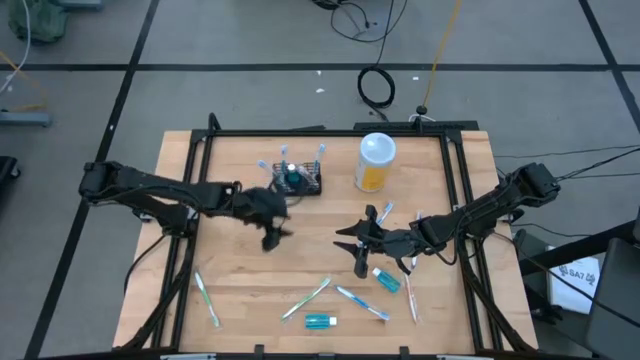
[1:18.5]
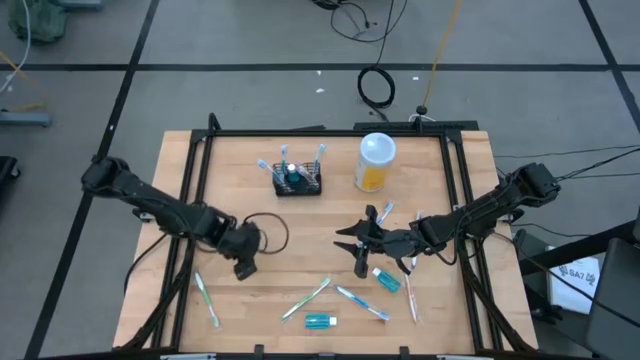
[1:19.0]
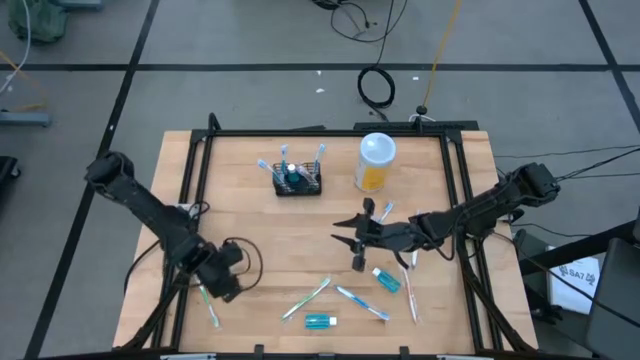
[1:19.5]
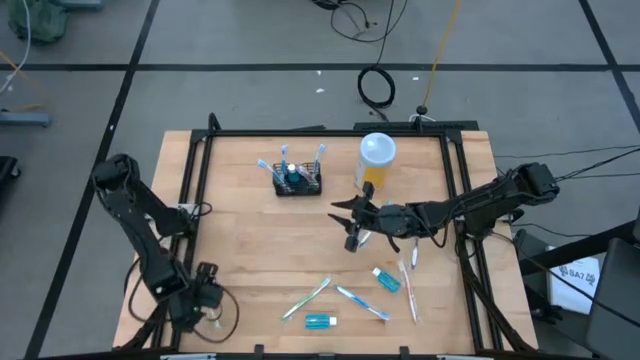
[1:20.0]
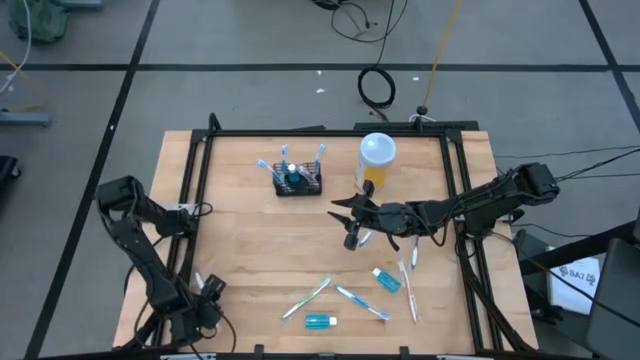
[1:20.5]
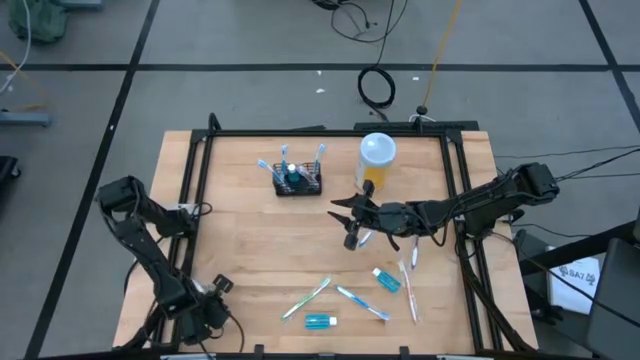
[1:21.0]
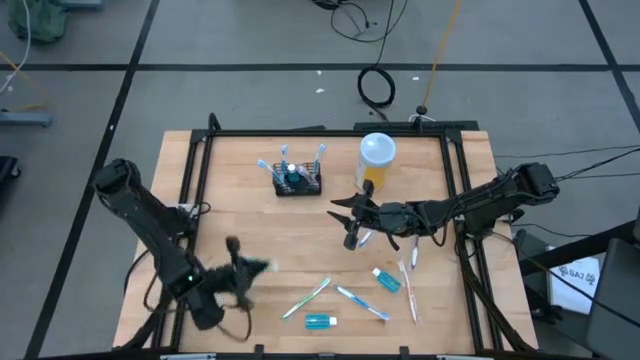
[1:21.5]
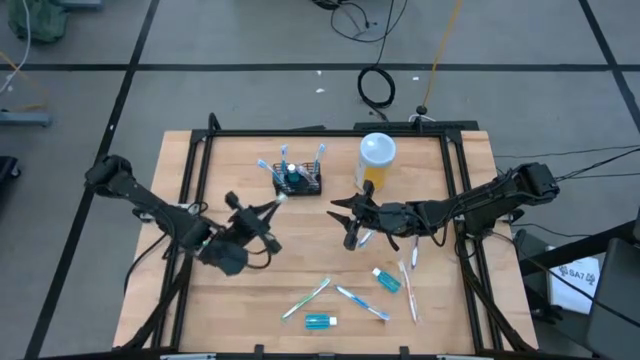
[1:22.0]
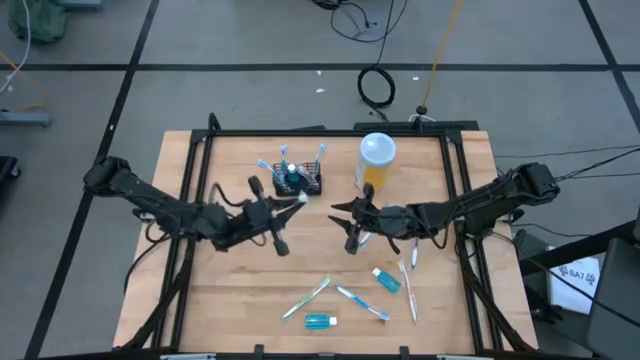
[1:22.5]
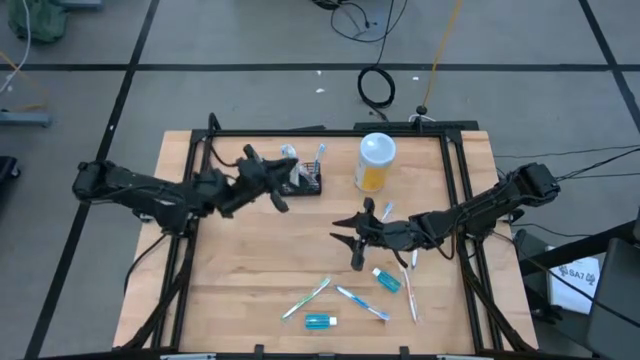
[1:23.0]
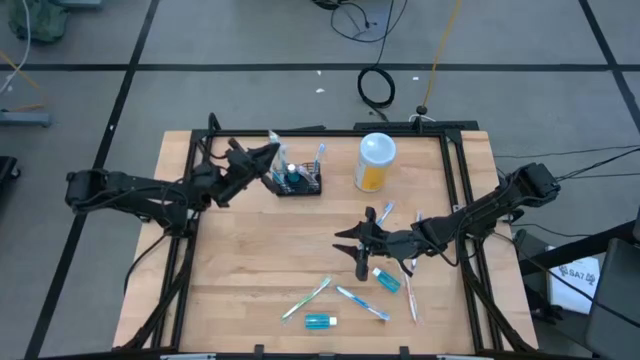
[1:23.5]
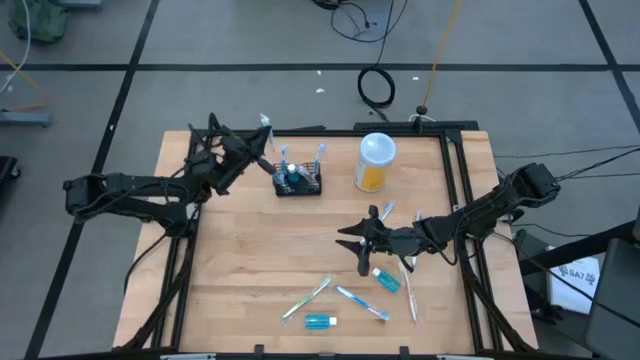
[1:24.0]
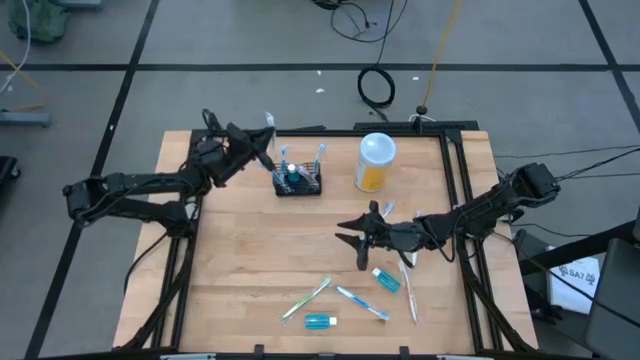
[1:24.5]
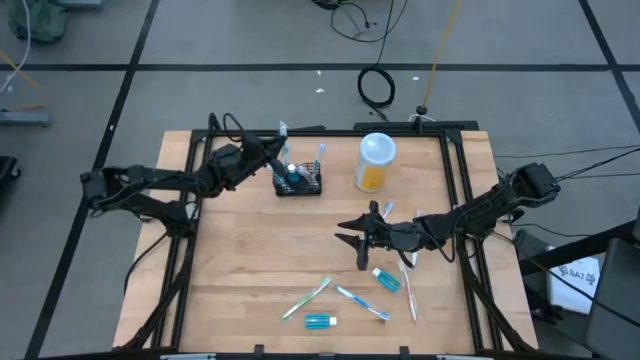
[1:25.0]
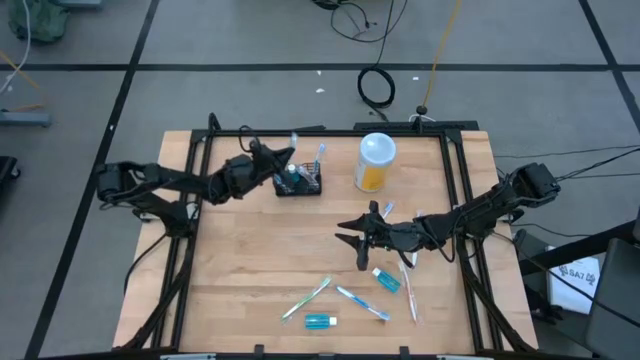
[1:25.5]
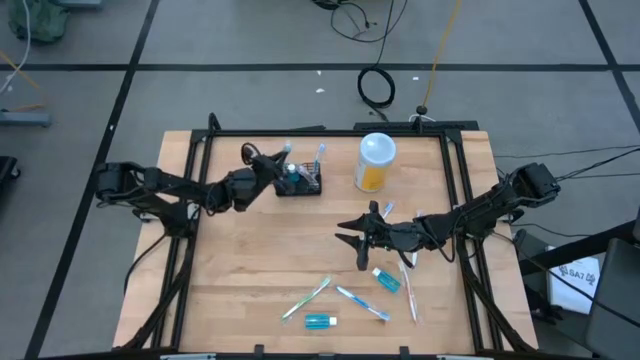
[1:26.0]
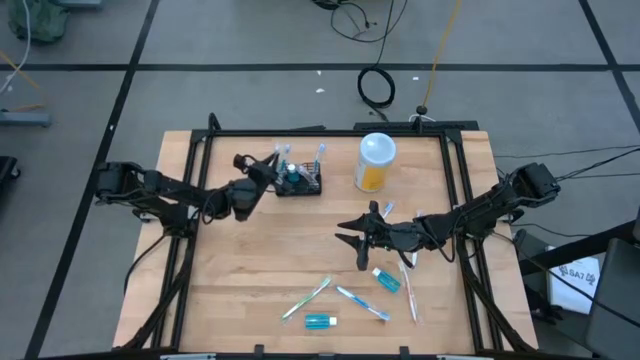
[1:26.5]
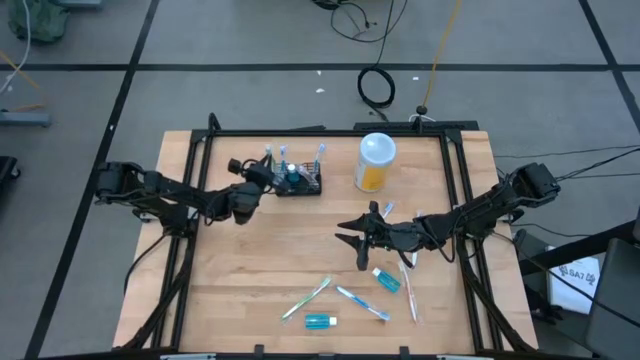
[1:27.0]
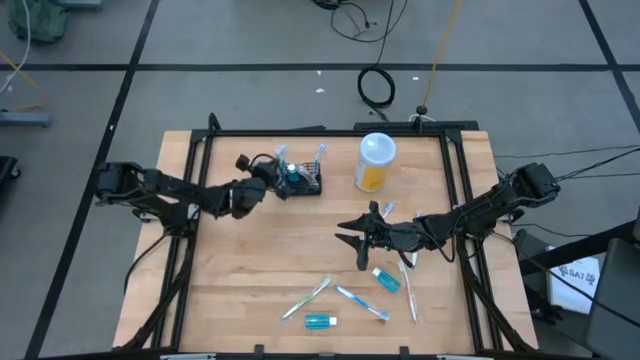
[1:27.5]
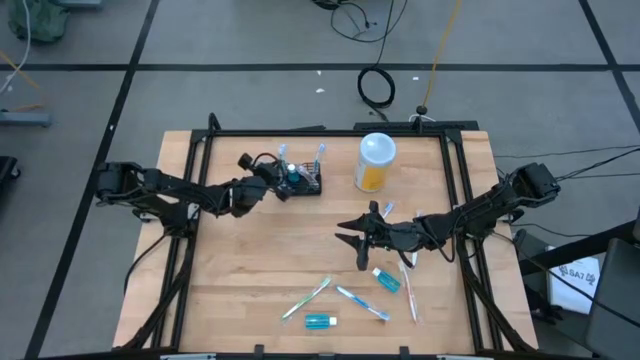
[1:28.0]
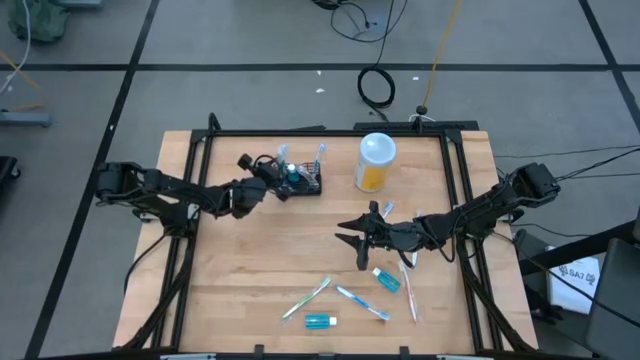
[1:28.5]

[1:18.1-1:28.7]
Task: Pick & Place toothbrushing station
Put the green toothbrush into the black mesh organizer

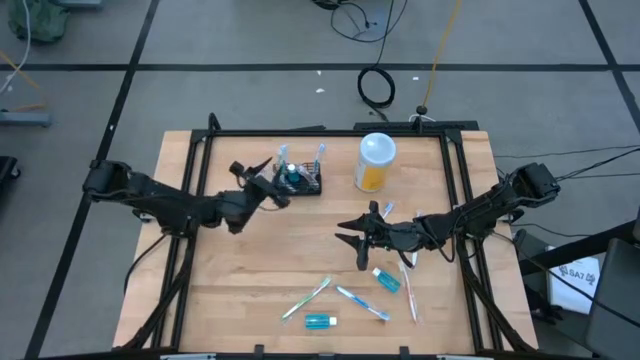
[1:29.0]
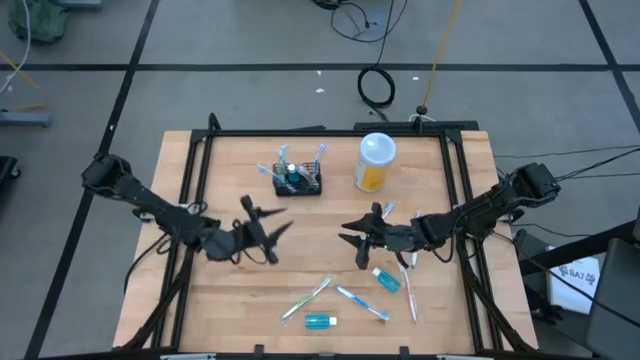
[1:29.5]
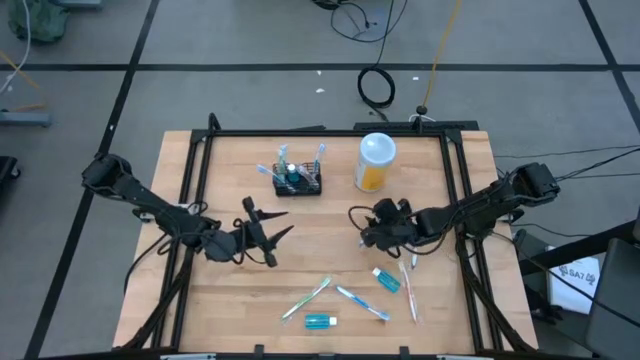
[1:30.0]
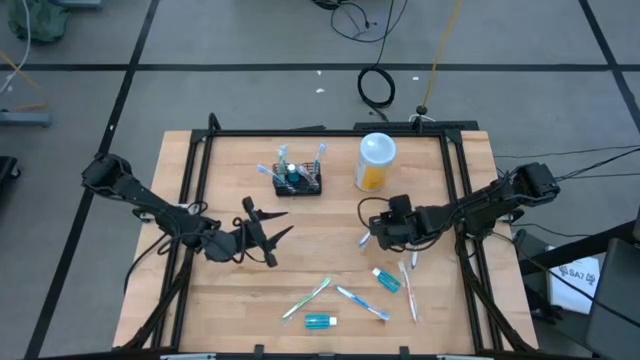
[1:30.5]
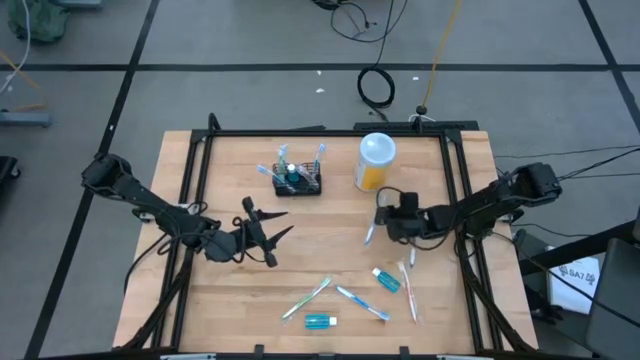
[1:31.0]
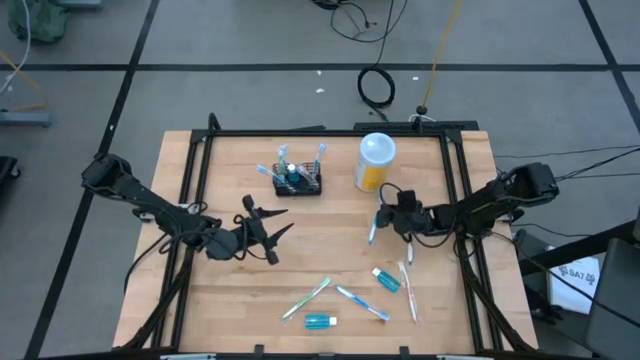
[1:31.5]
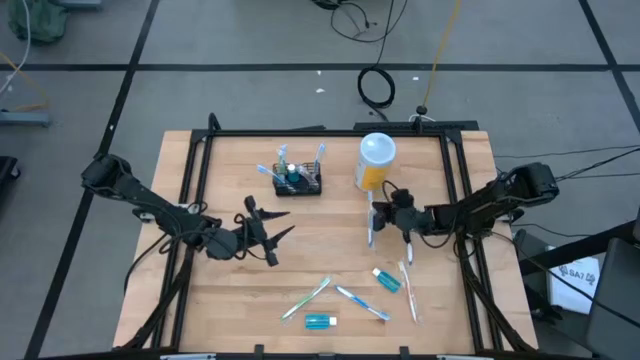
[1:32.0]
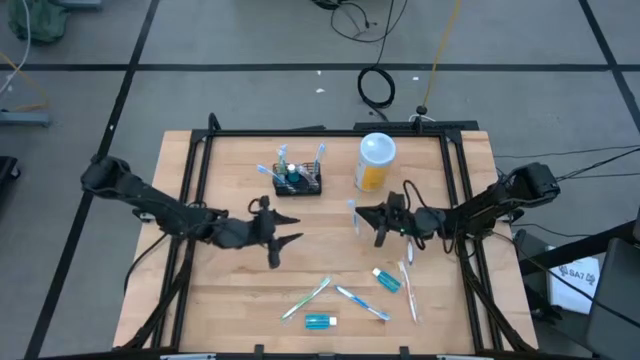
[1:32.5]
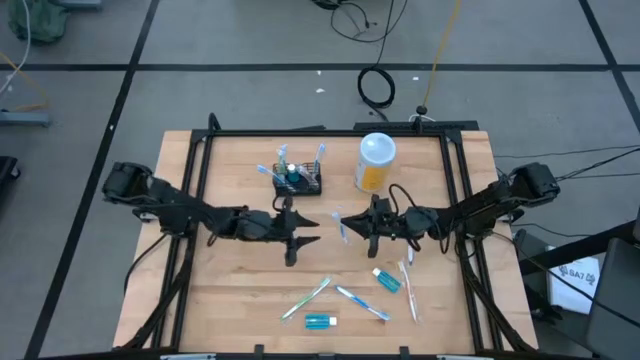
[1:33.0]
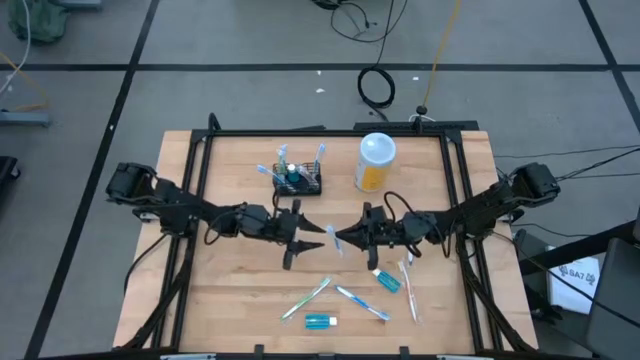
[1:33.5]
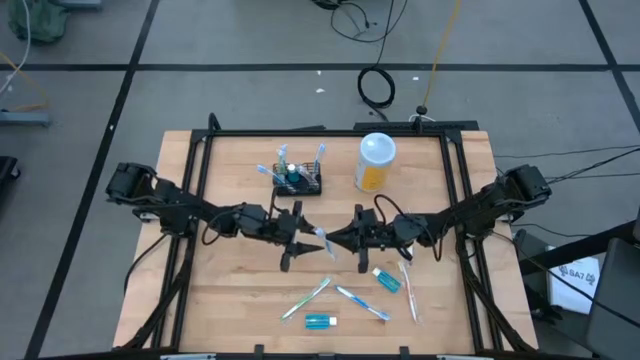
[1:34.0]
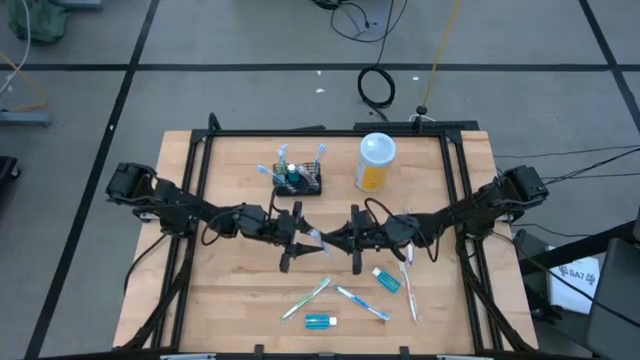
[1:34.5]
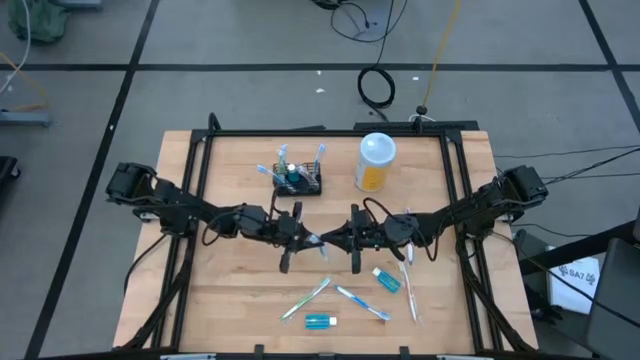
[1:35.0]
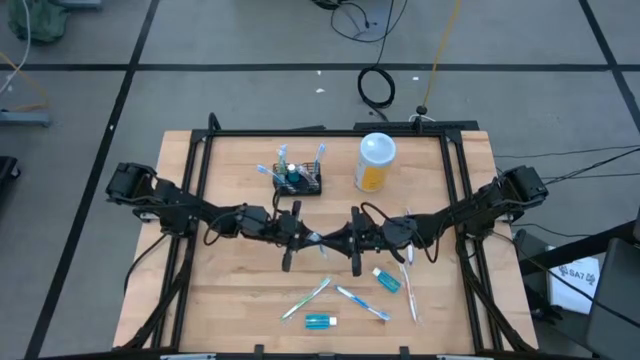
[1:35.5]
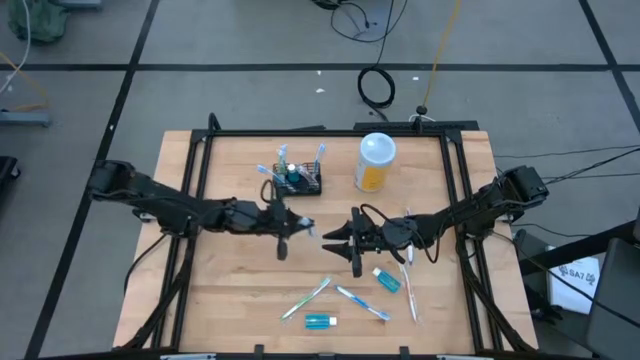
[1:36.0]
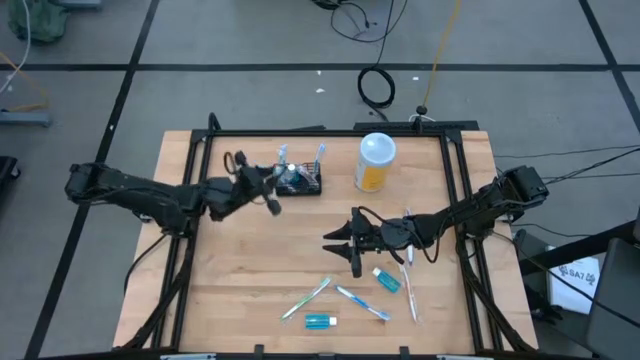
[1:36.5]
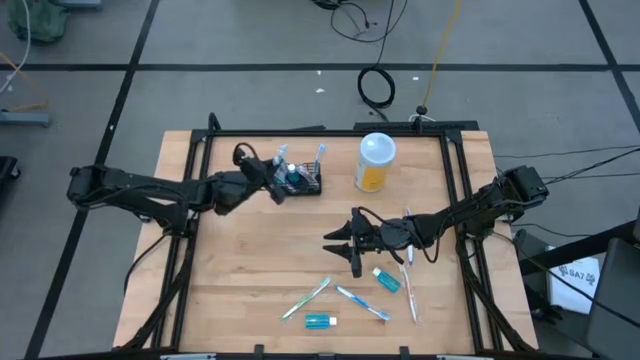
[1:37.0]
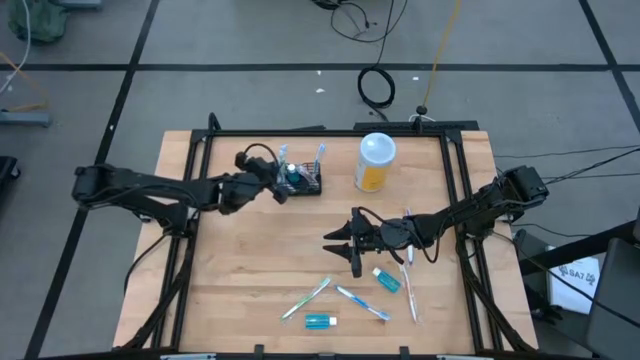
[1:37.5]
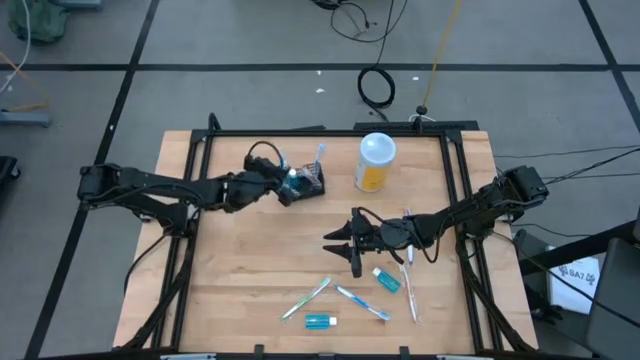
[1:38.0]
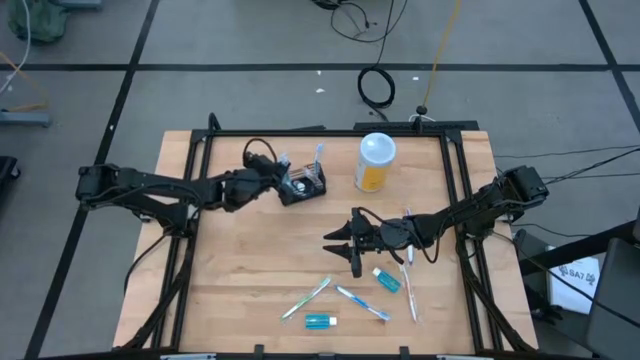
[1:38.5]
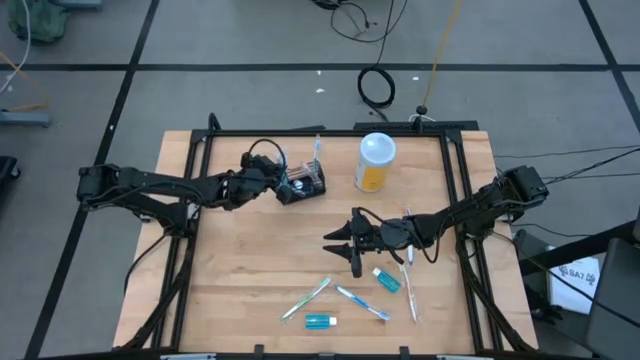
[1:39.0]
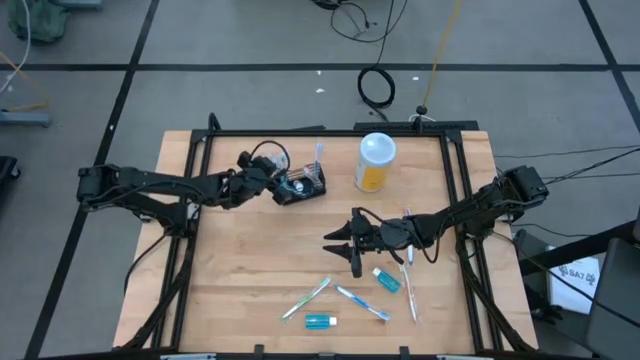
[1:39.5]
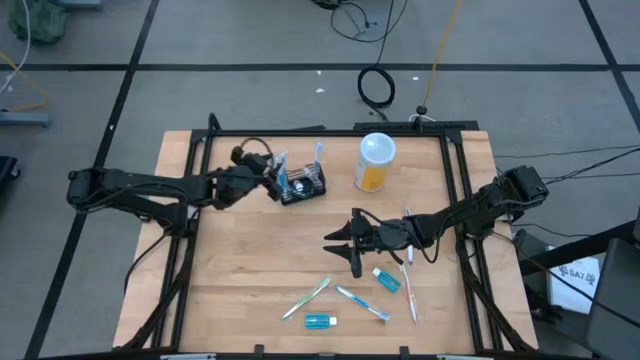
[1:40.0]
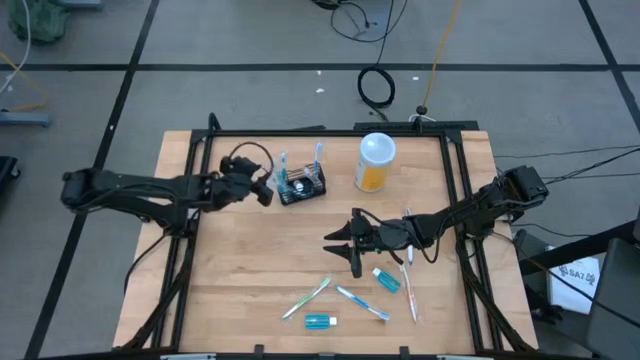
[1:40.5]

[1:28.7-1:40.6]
Put the blue toothbrush into the black mesh organizer
